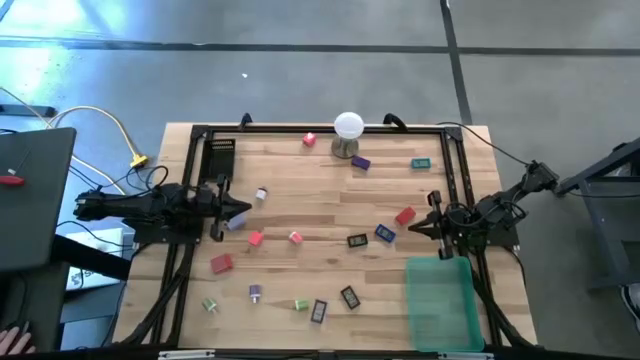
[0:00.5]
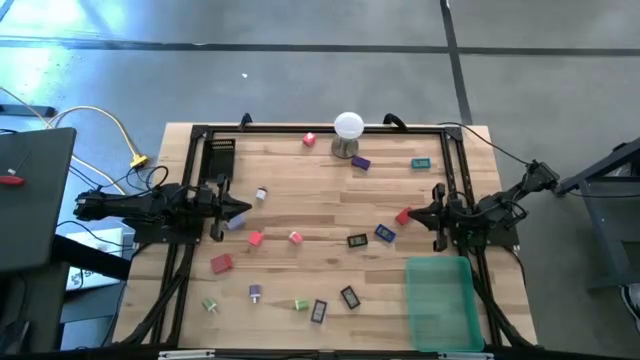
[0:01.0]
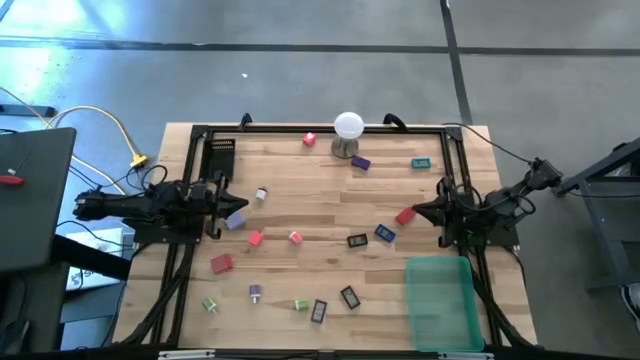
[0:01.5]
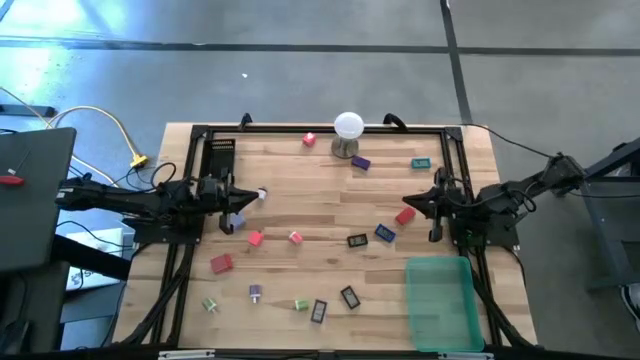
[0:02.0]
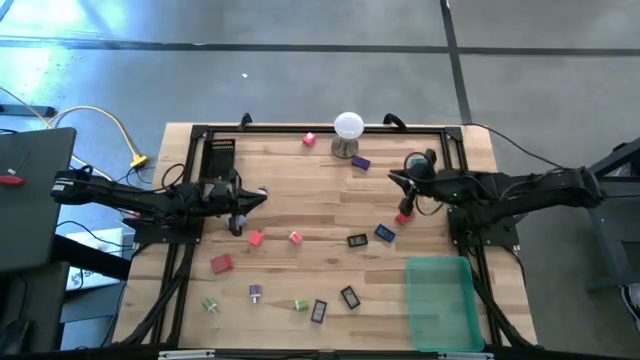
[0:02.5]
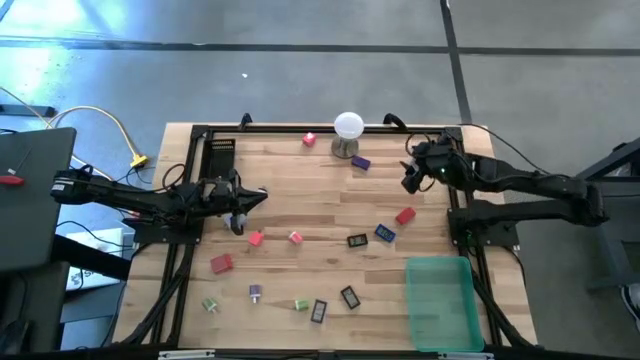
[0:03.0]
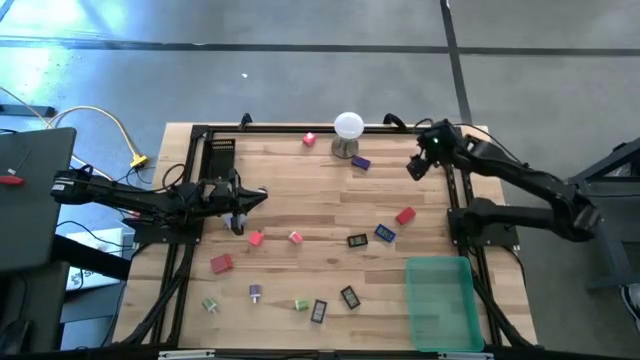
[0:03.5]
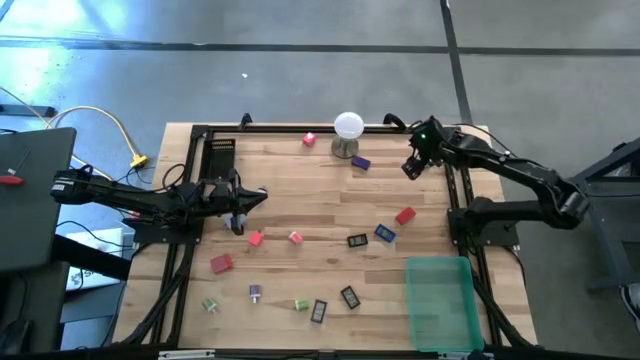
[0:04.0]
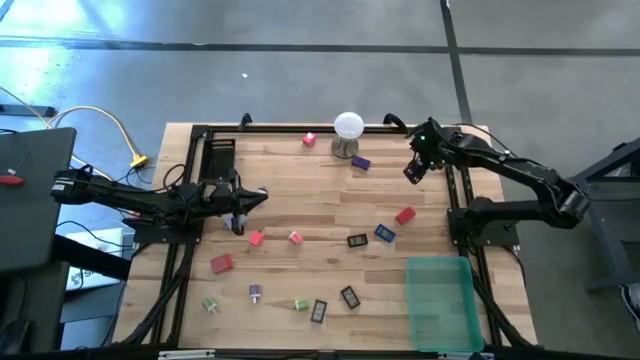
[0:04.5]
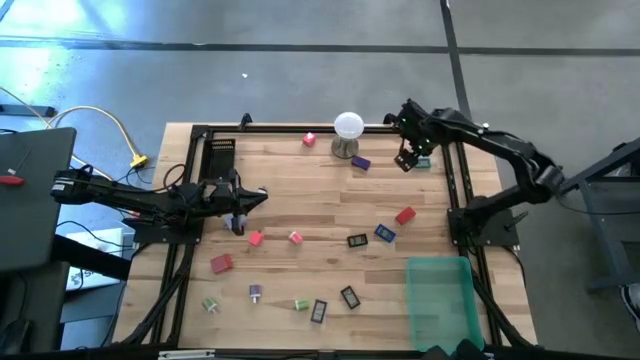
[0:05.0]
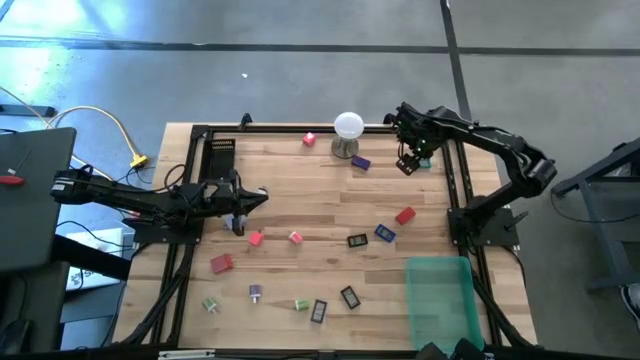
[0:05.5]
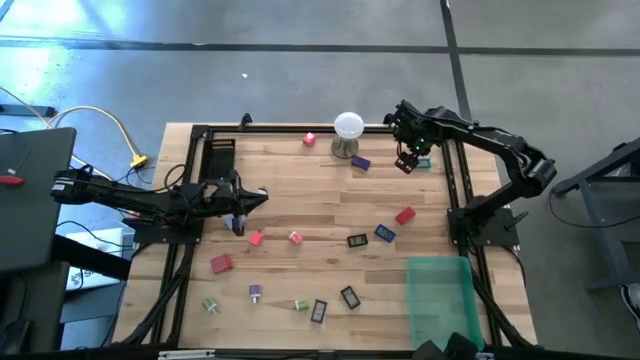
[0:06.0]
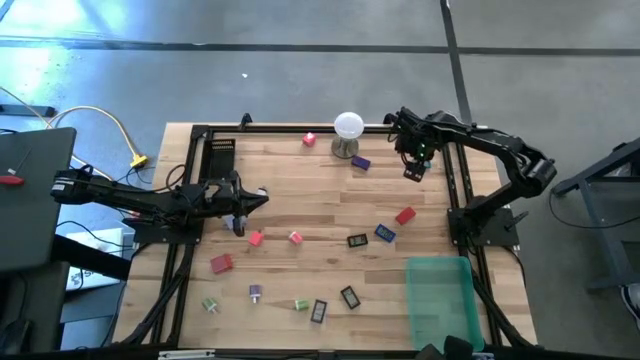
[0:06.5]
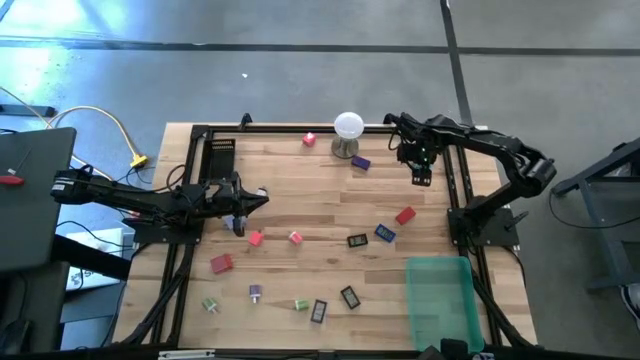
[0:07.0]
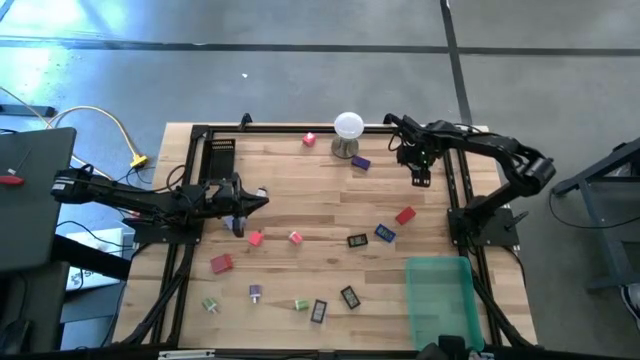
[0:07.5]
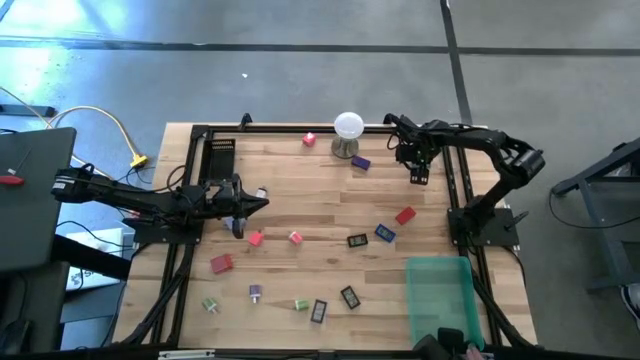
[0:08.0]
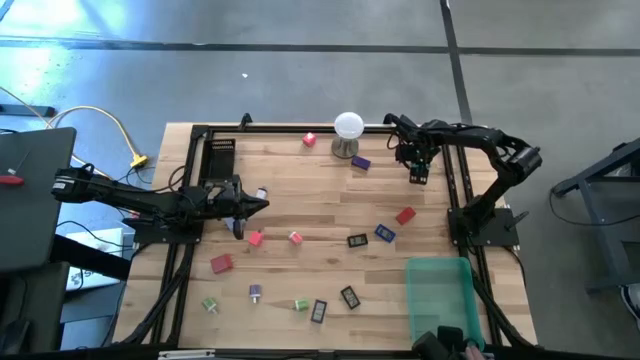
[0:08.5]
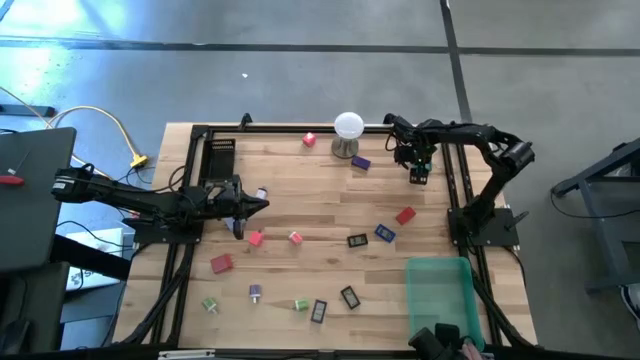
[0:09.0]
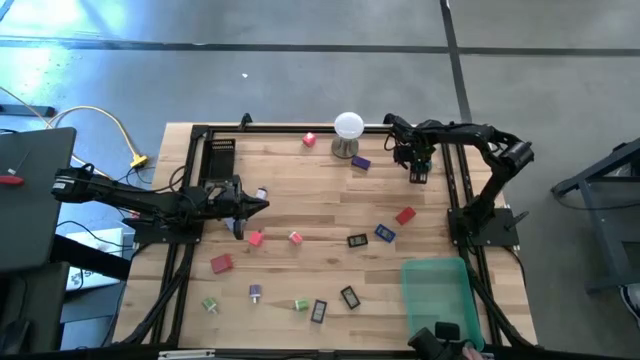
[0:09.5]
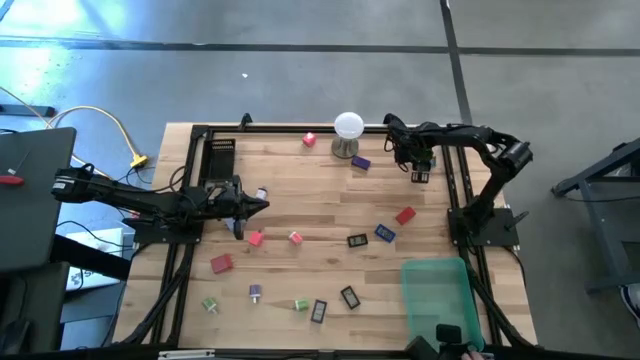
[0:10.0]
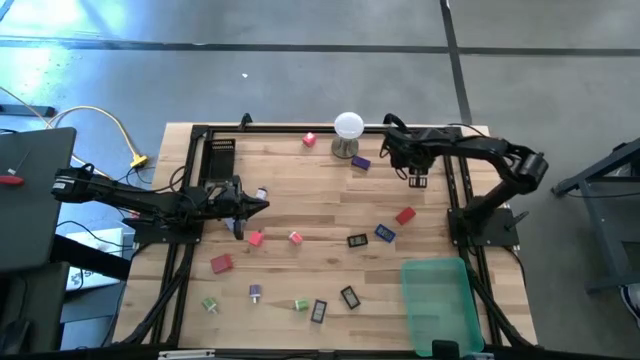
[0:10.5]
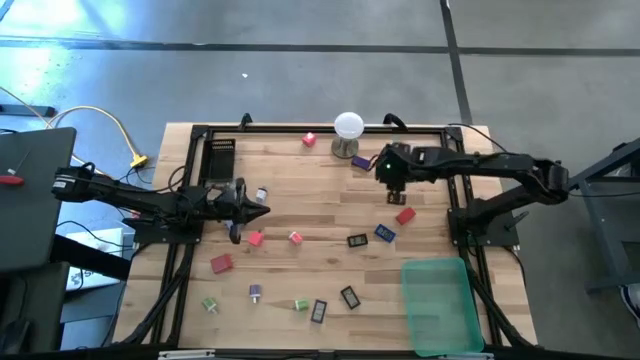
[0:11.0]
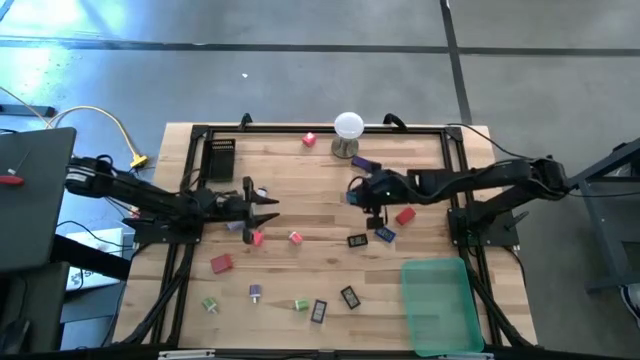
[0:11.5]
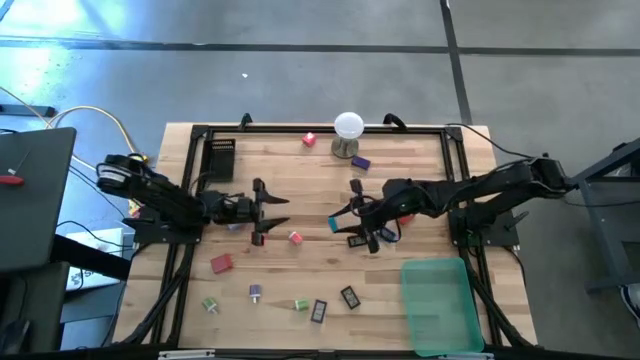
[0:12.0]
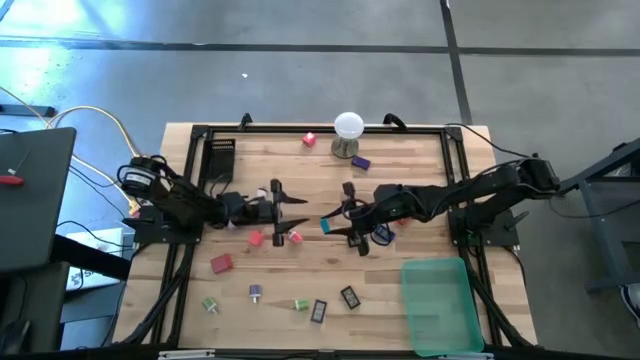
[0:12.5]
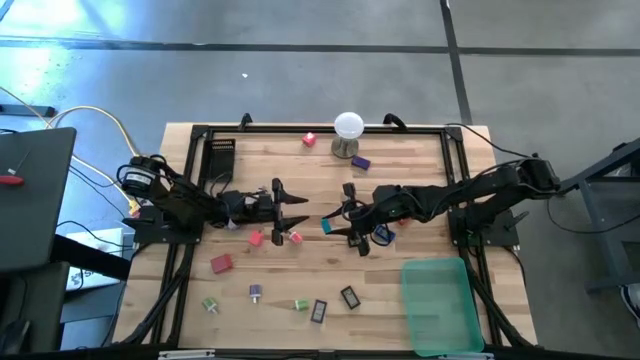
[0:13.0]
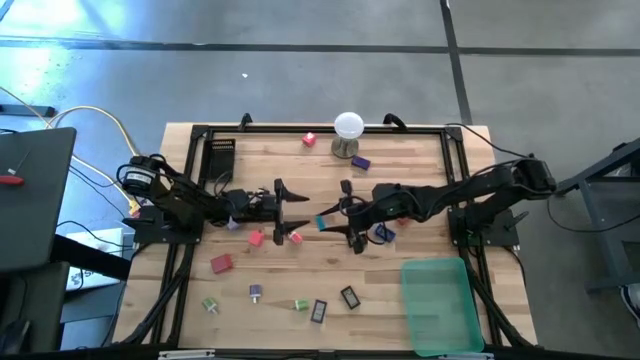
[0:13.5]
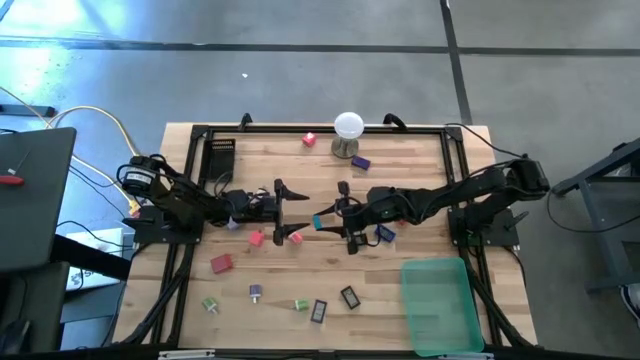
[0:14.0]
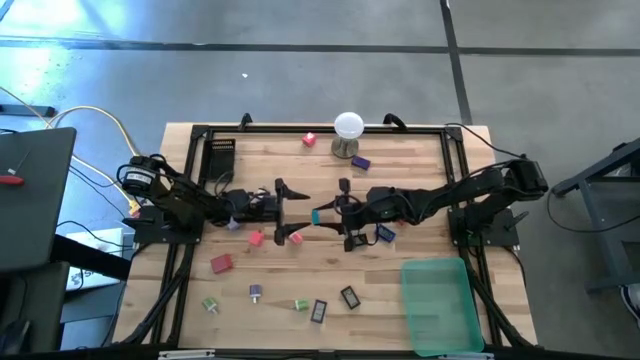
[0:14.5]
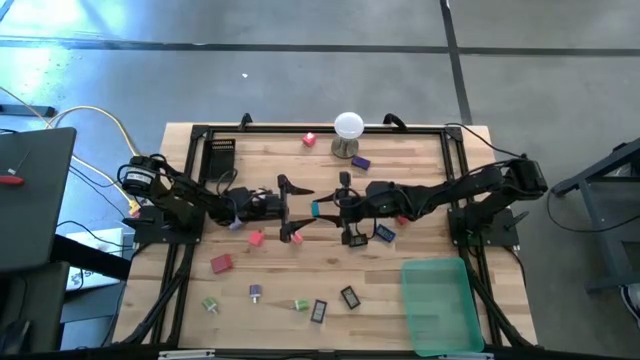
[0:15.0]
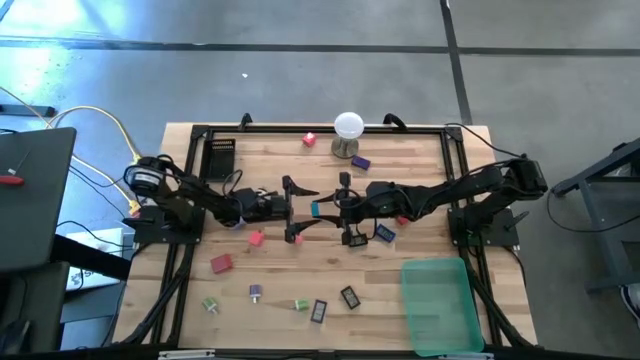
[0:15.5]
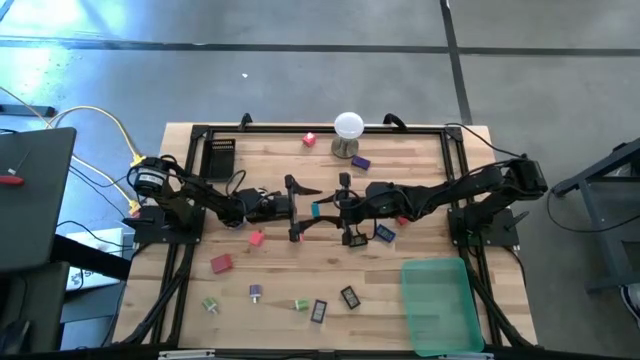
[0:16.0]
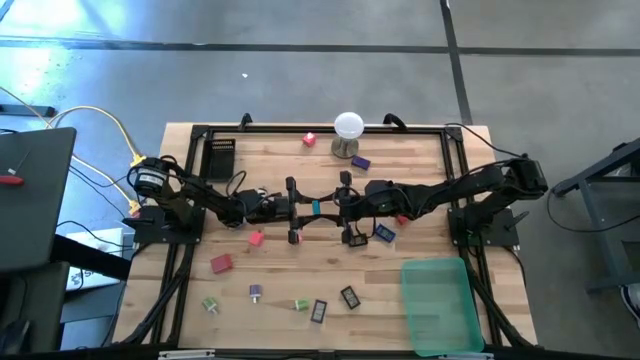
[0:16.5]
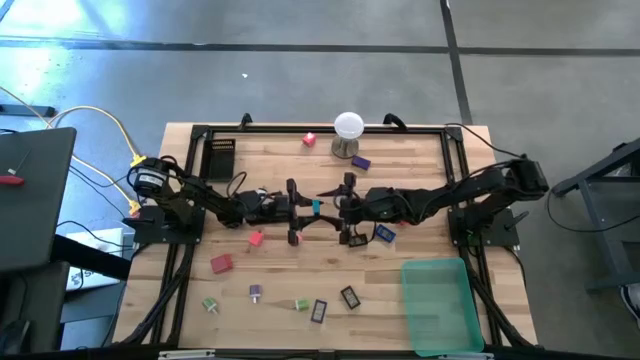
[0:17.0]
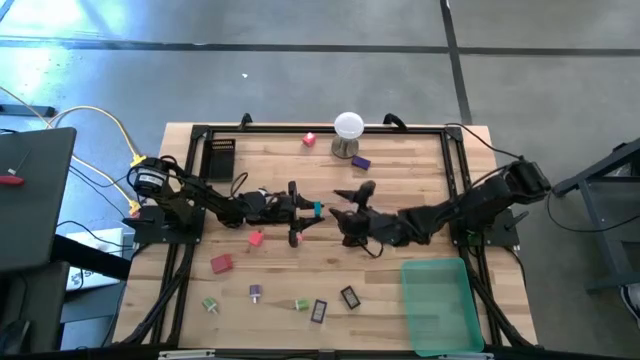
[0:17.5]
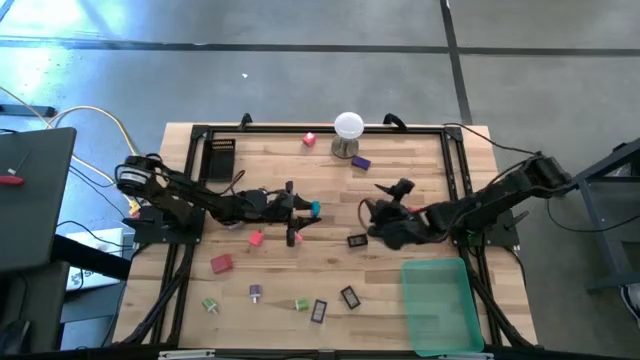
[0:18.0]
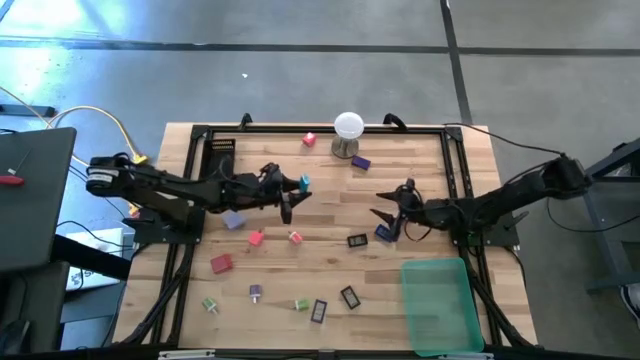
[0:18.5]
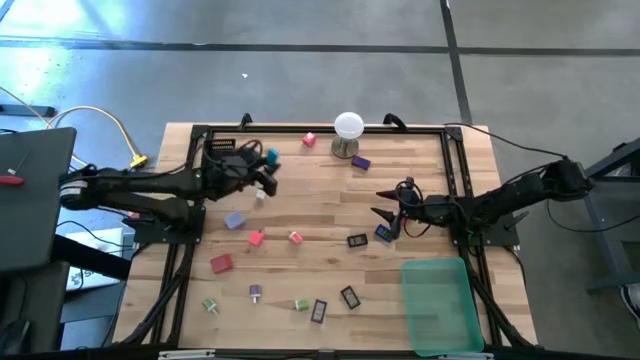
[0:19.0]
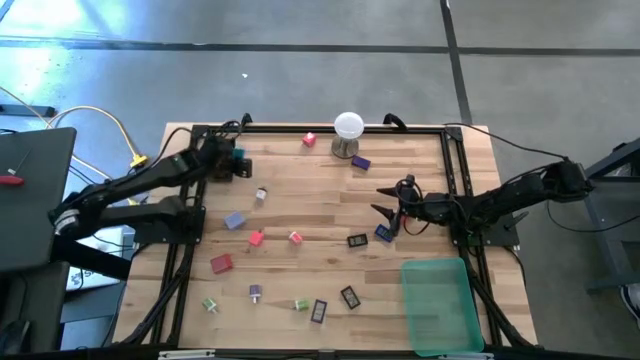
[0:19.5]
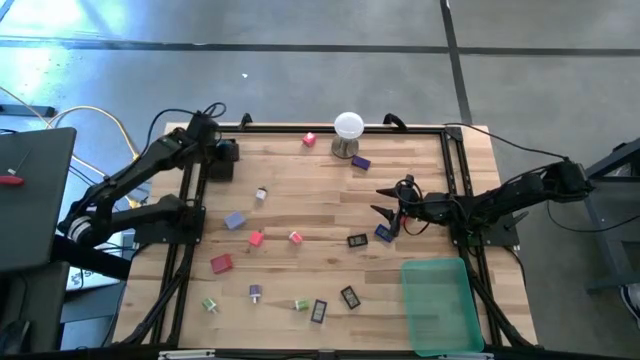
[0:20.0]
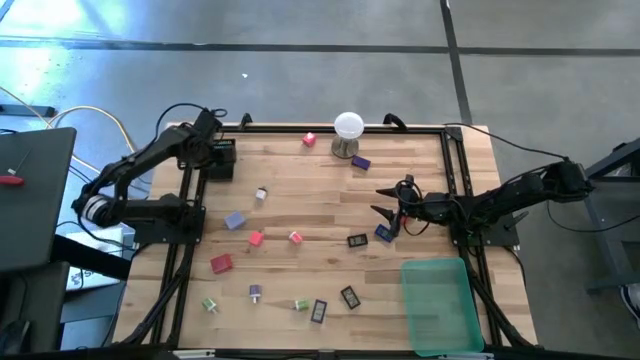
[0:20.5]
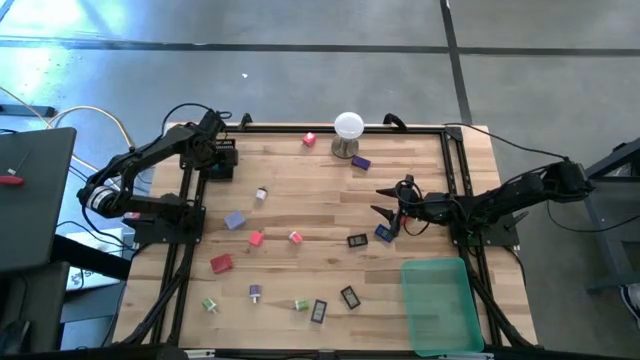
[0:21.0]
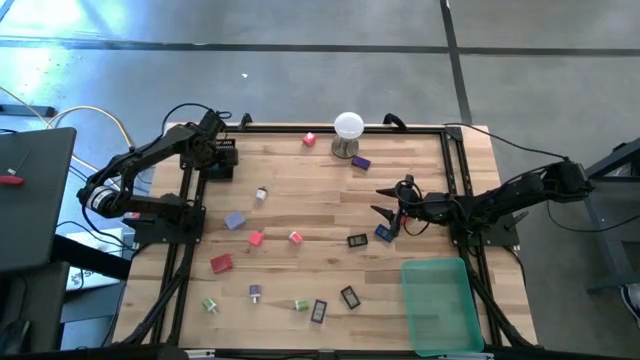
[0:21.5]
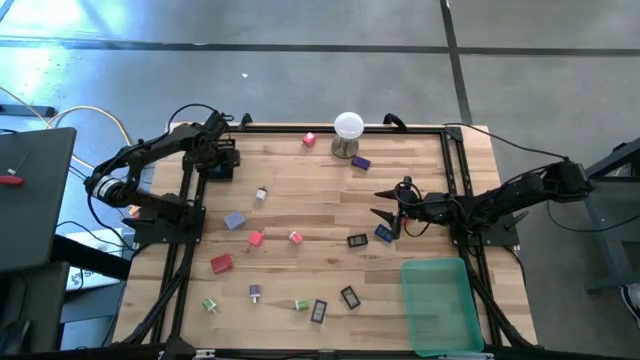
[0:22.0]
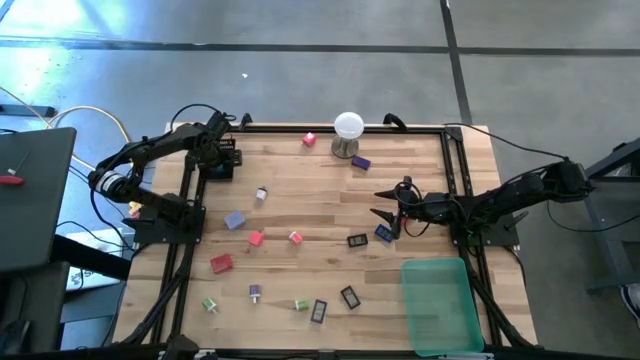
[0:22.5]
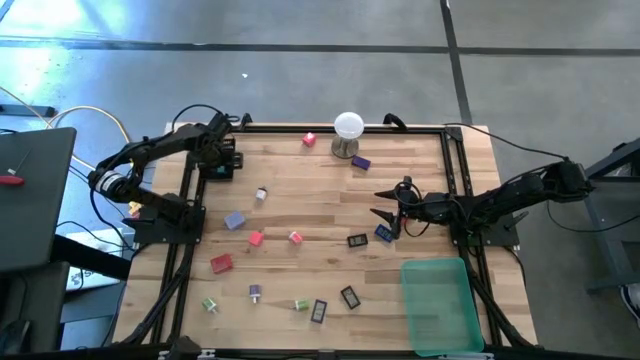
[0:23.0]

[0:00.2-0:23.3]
Task: Pick & Place Office items
Put the light blue digital clock into the black bin
